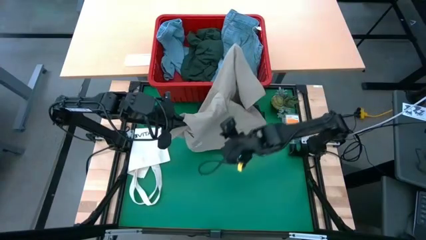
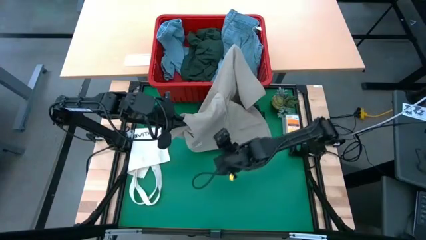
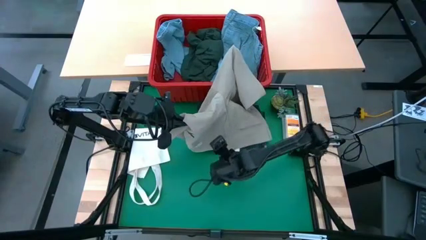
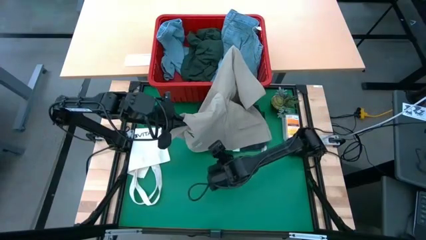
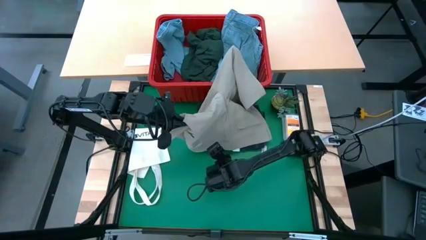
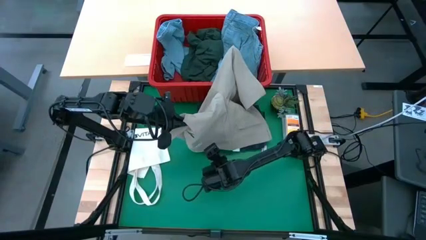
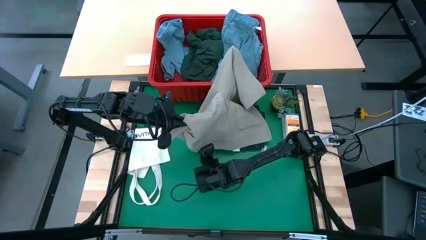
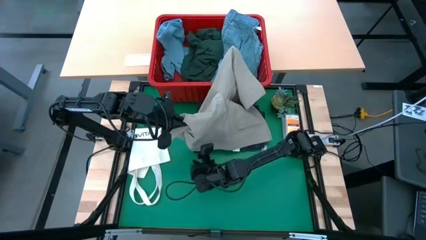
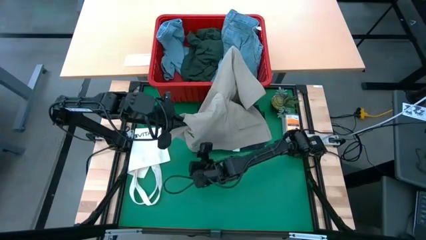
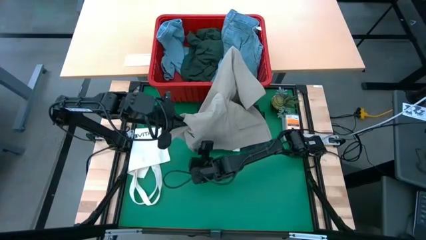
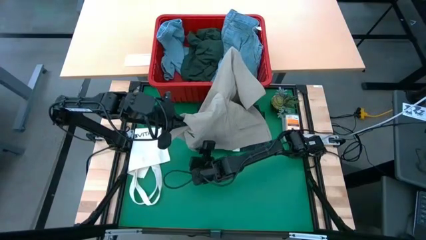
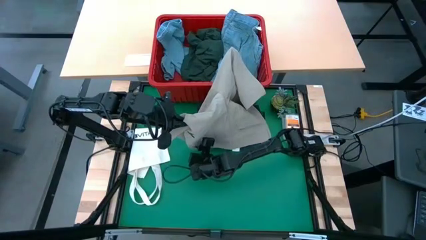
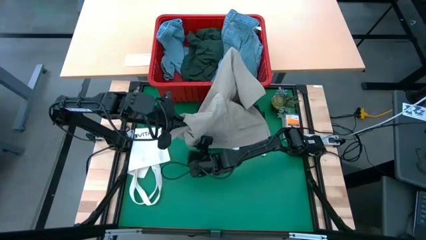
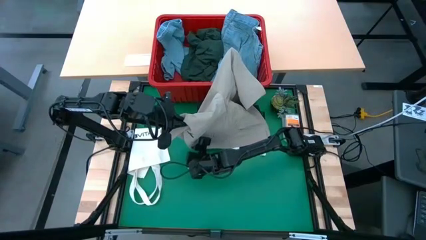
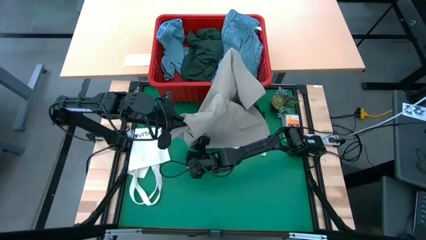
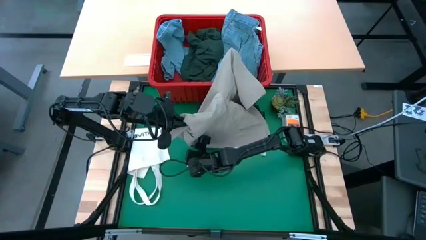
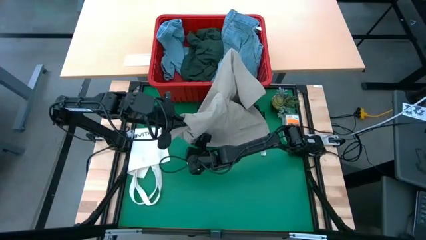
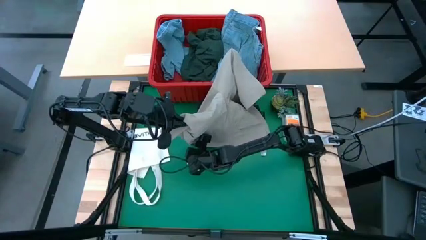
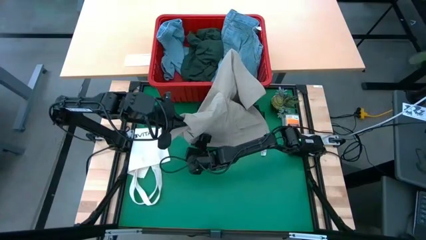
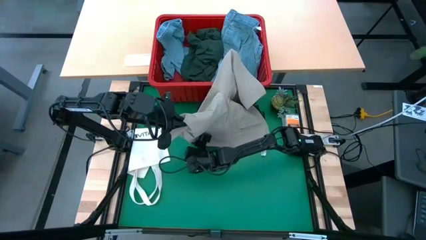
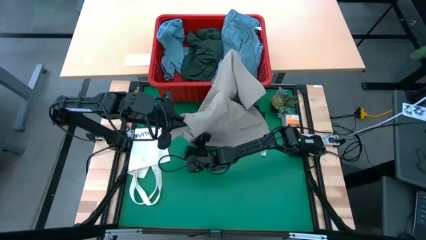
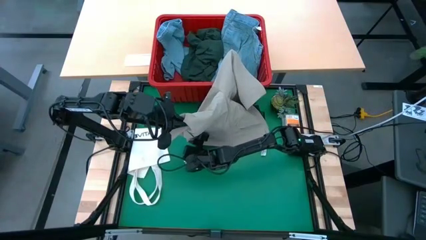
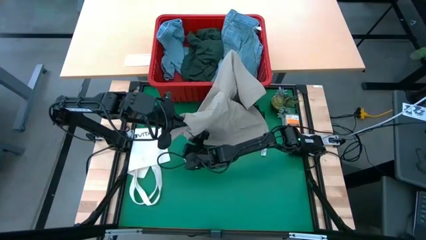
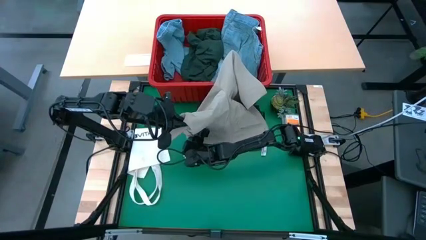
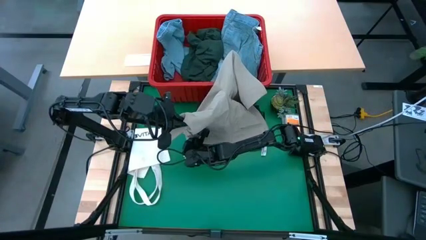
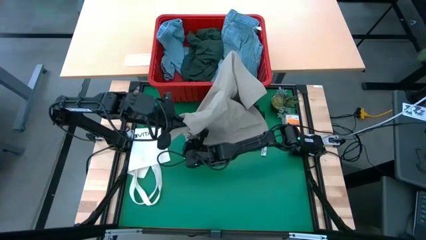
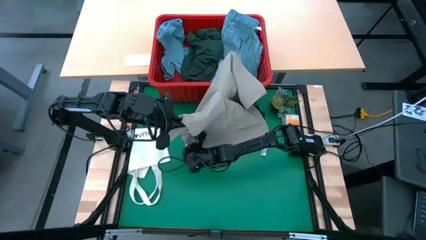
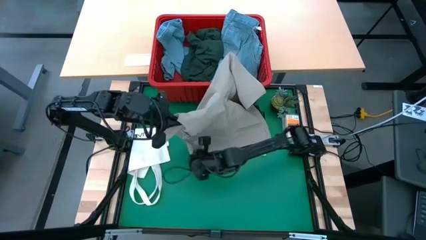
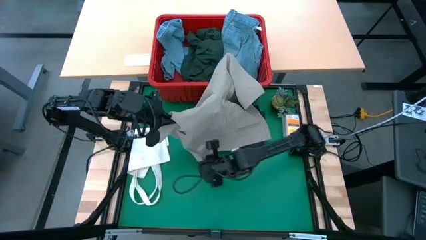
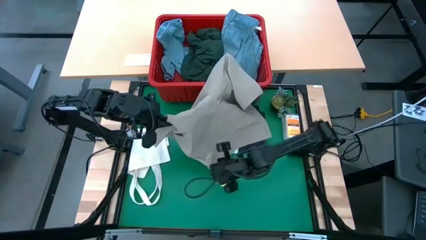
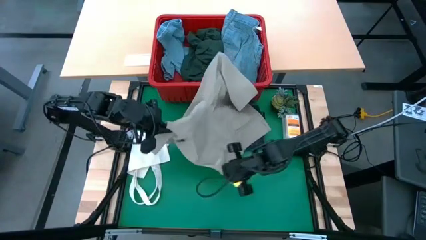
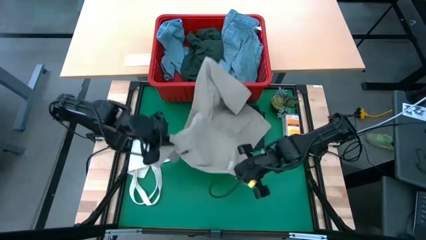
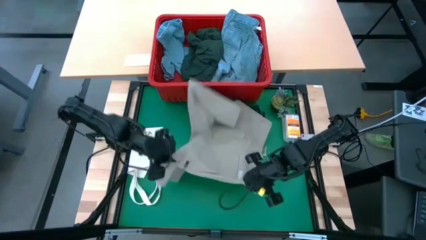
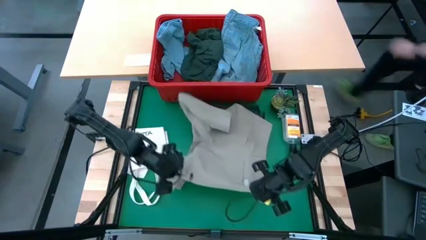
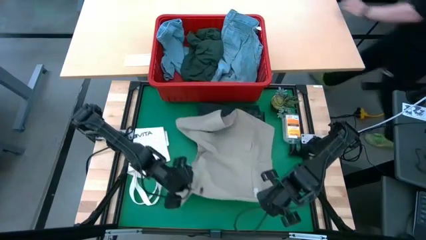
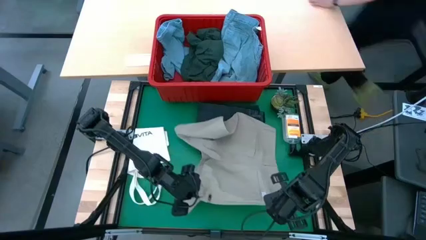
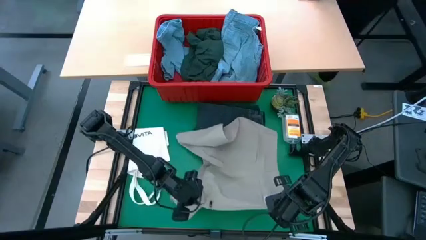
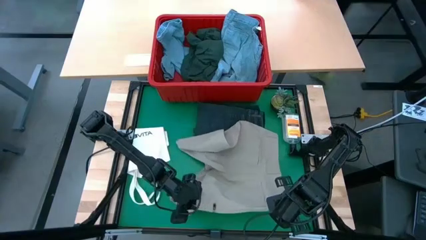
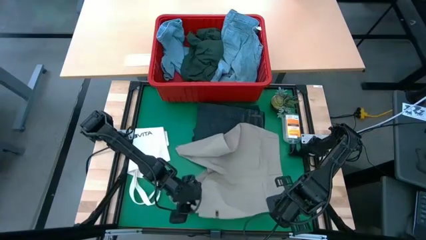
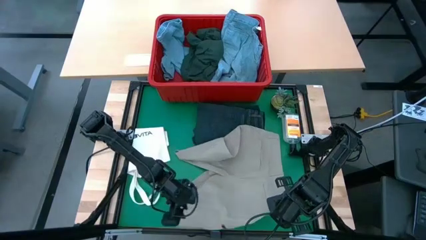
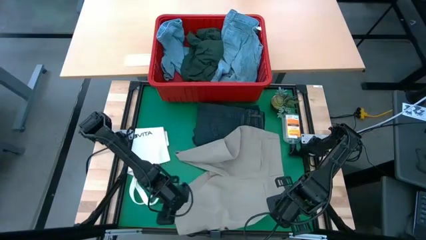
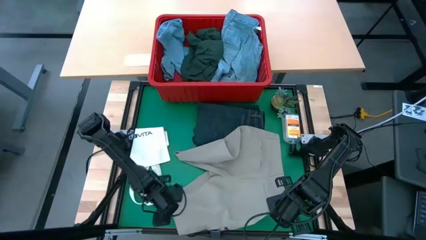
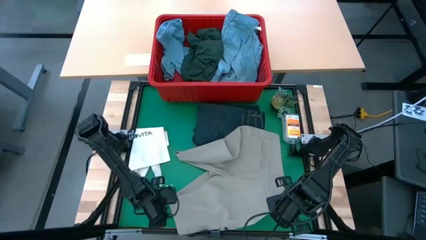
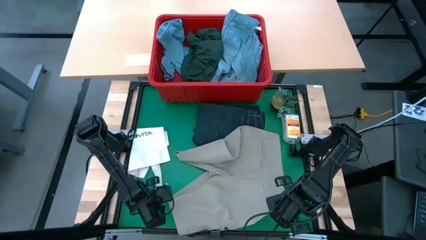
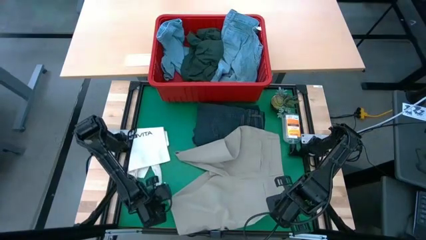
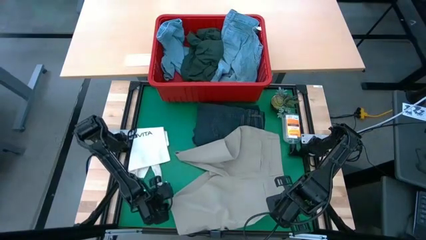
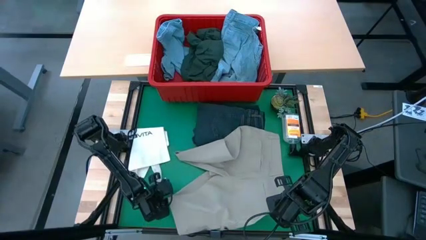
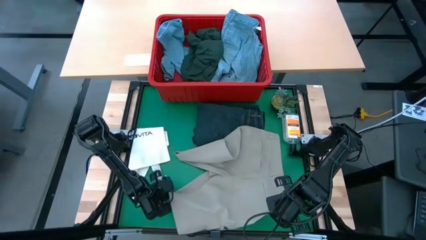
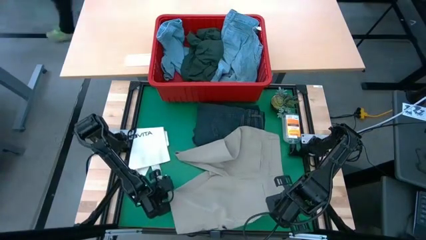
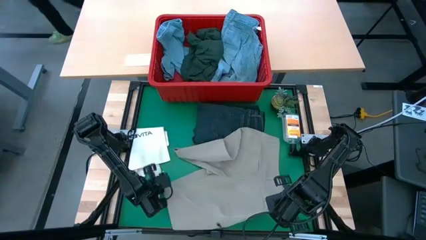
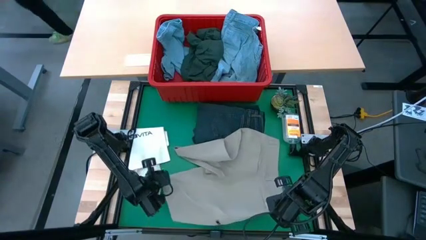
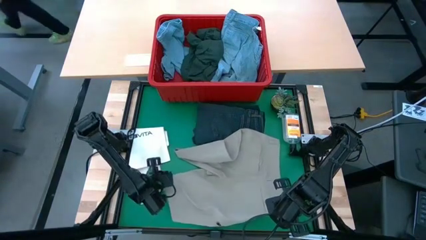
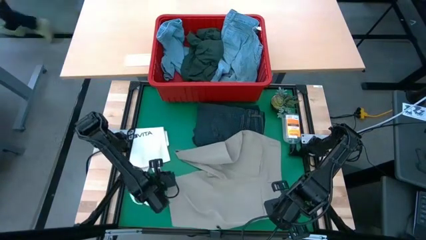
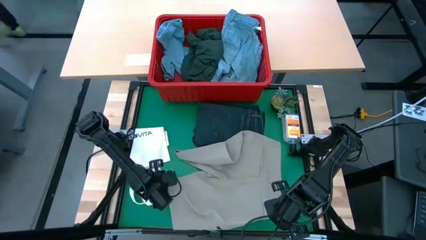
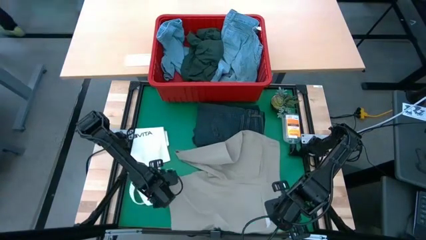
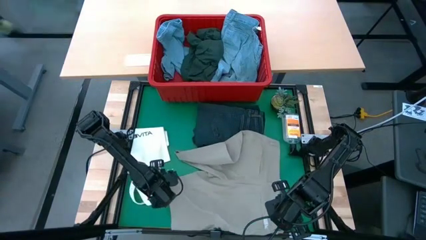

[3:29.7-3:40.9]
Task: Fold laundry
Remove the brown shorts from the laundry bin

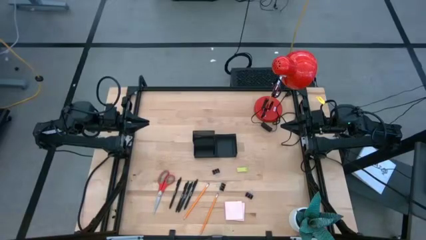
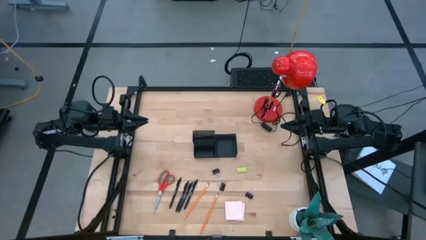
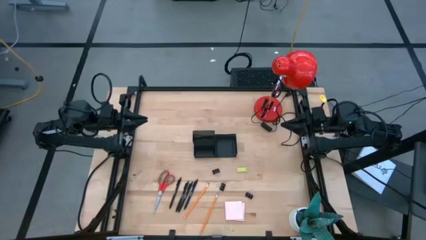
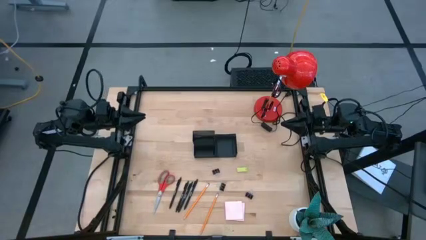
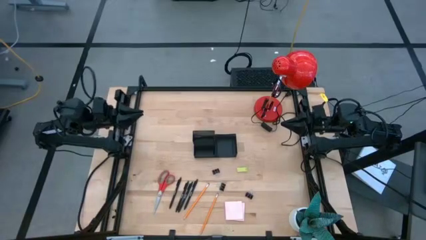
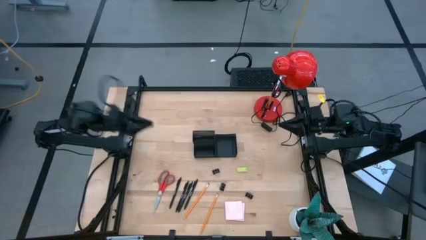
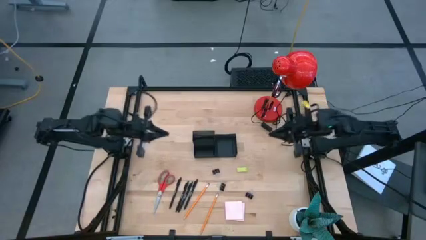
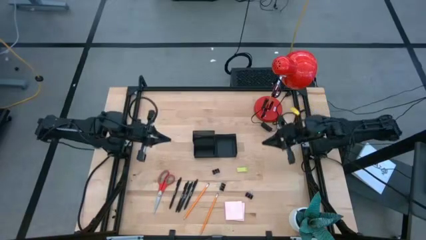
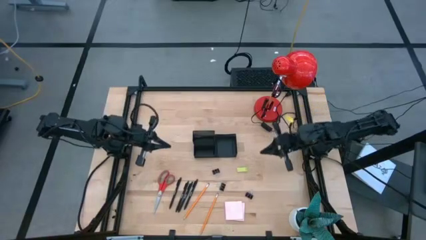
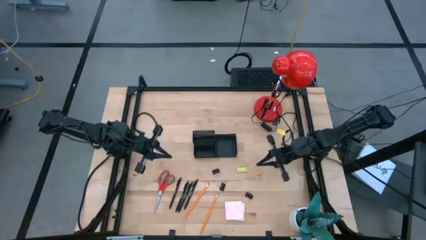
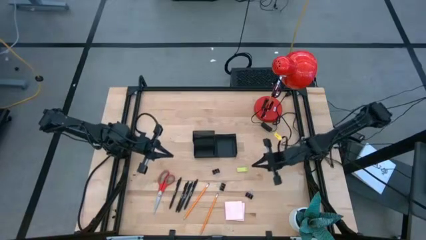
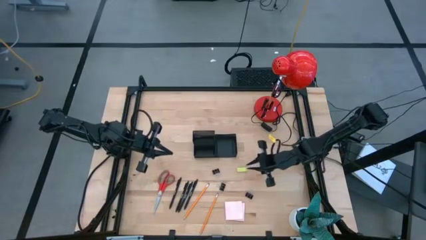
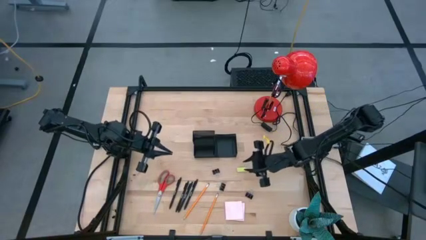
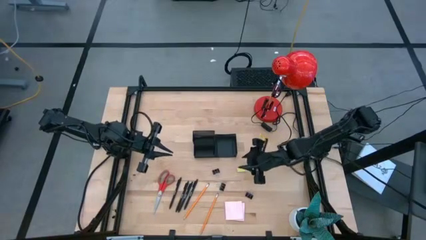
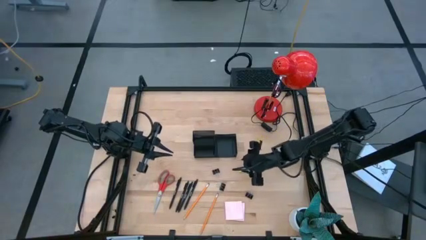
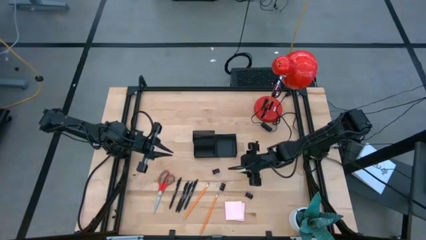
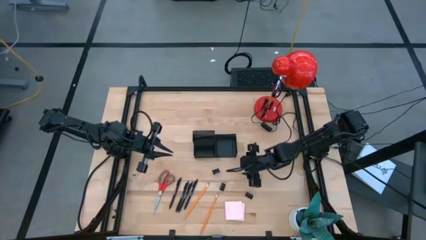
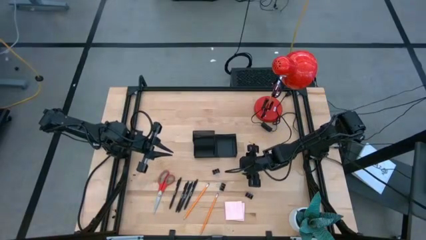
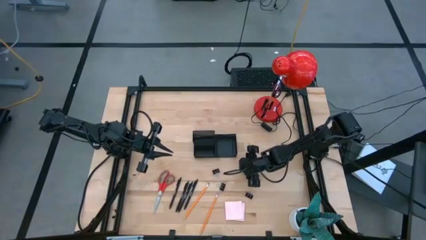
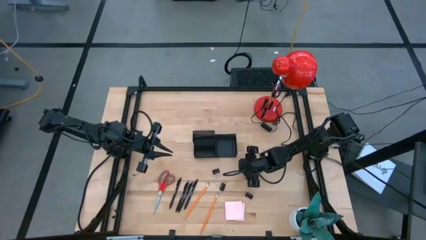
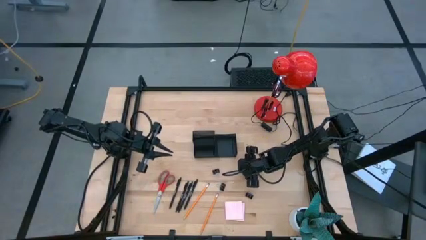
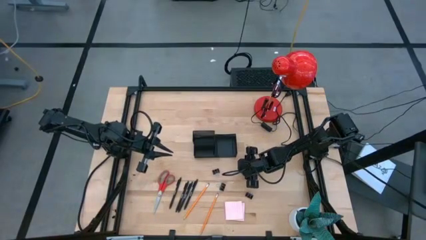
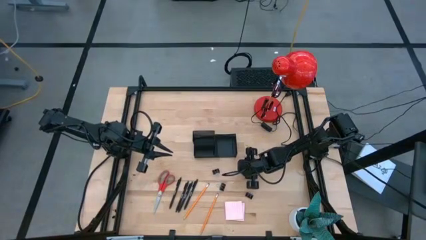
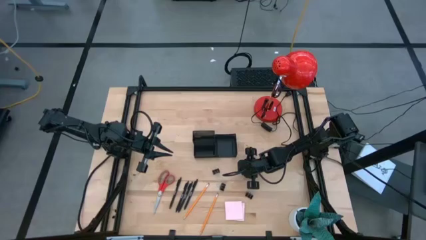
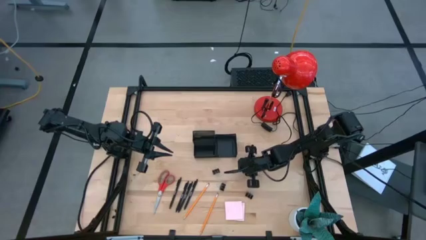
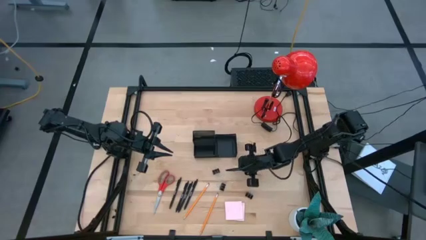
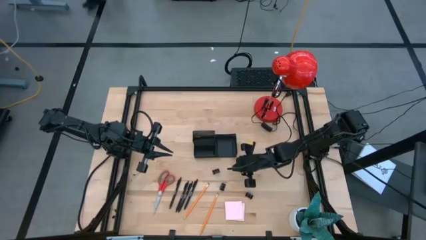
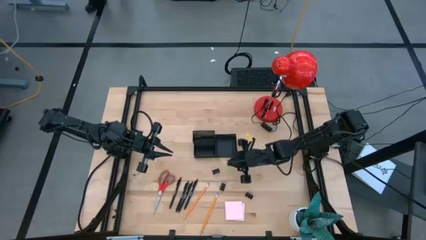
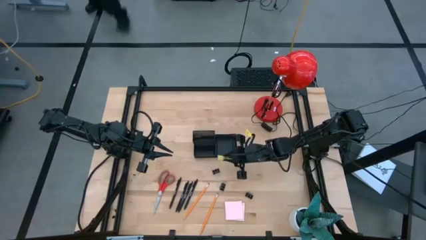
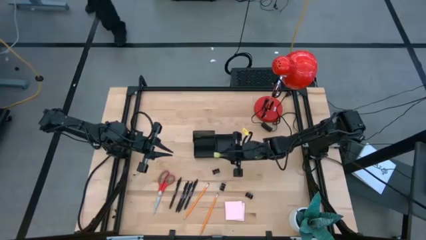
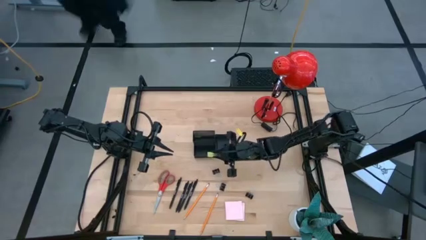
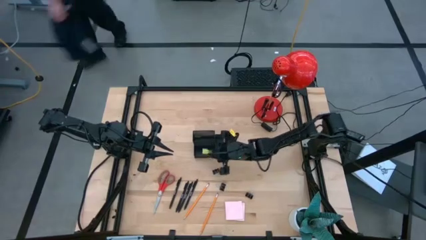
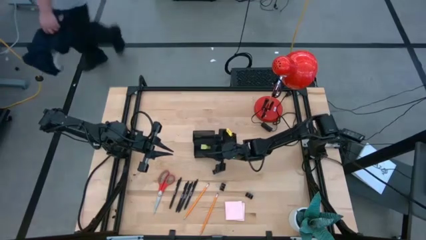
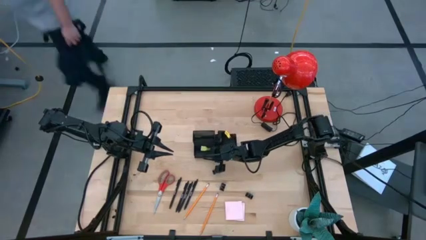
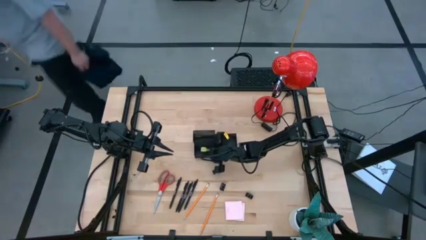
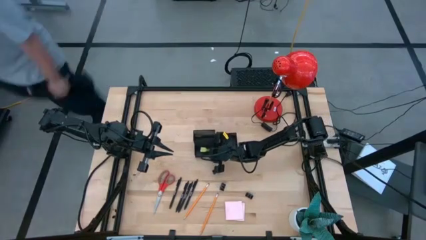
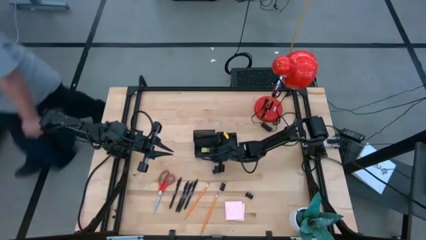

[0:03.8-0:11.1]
Task: Pick and place office supplies into organizer
Put the eraser into the desk organizer
